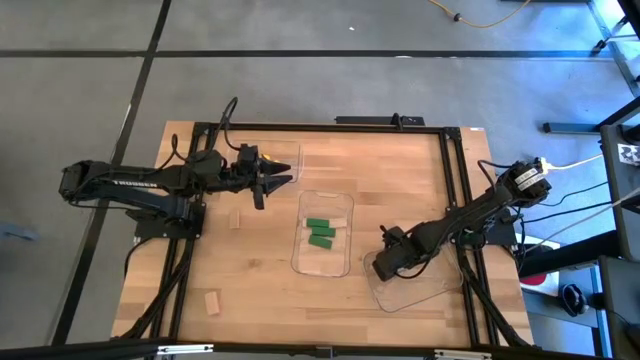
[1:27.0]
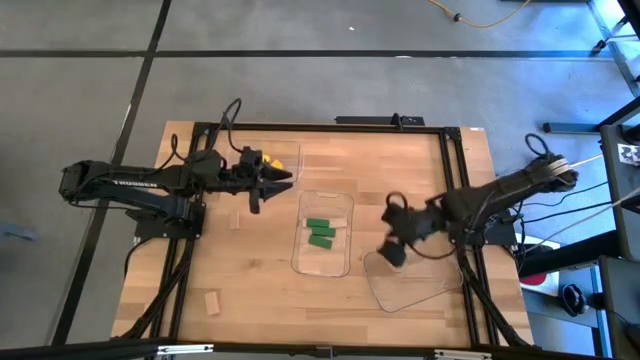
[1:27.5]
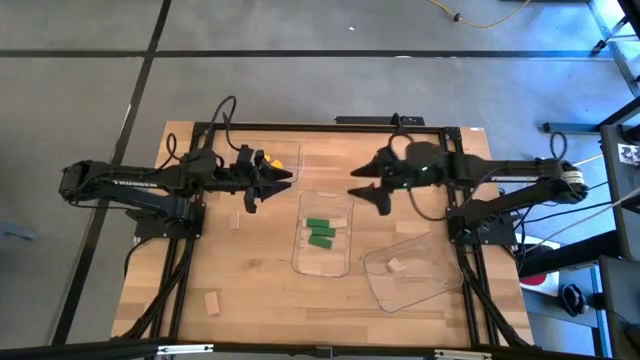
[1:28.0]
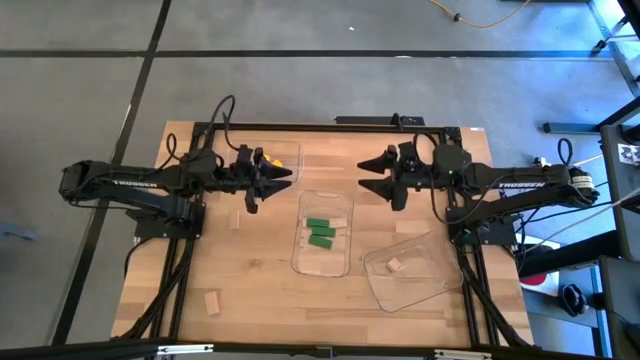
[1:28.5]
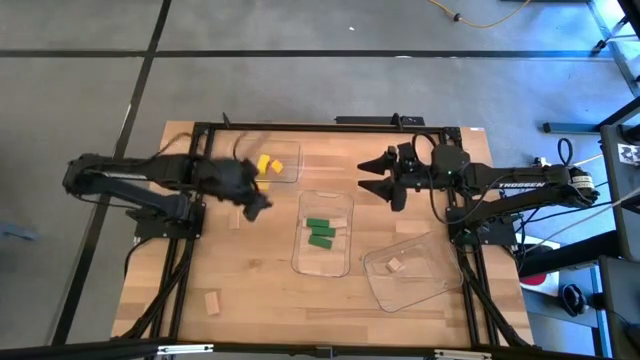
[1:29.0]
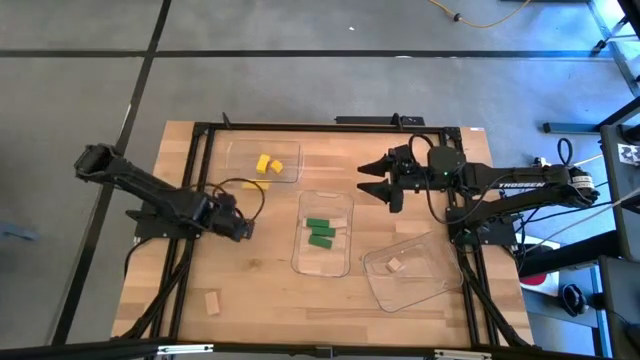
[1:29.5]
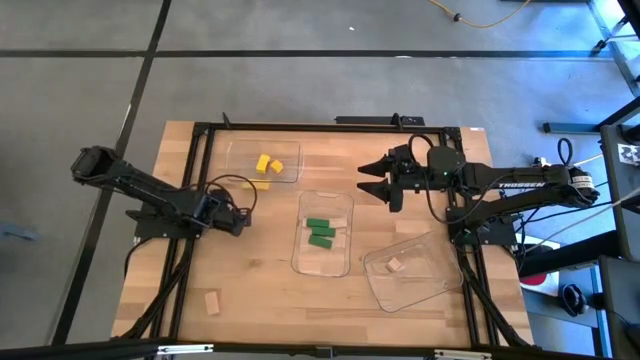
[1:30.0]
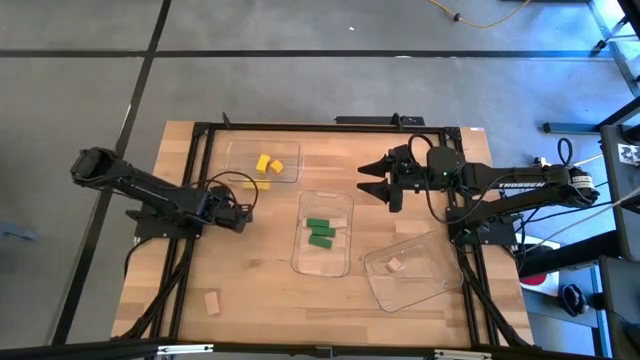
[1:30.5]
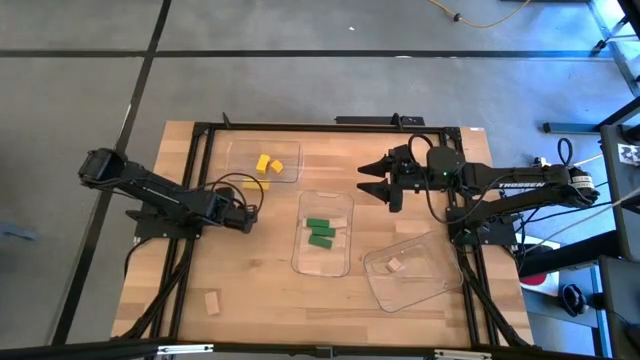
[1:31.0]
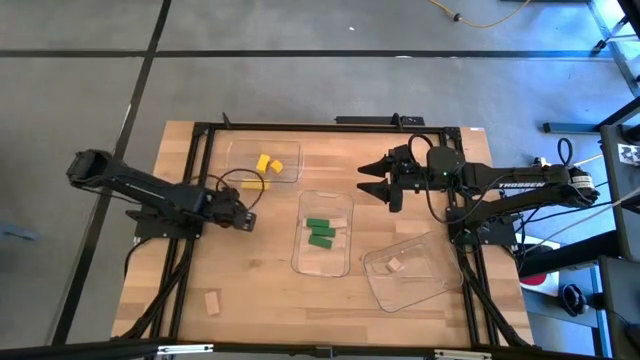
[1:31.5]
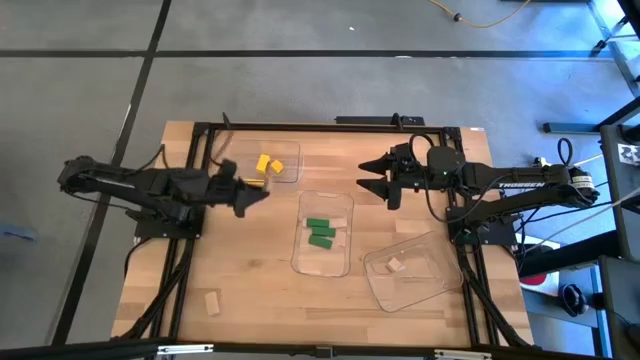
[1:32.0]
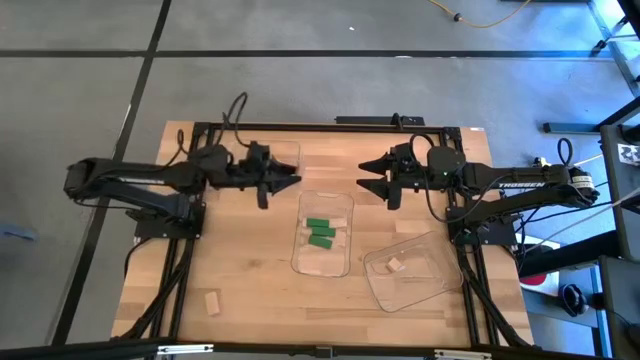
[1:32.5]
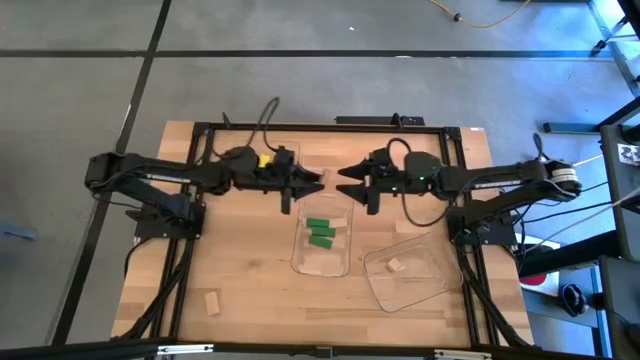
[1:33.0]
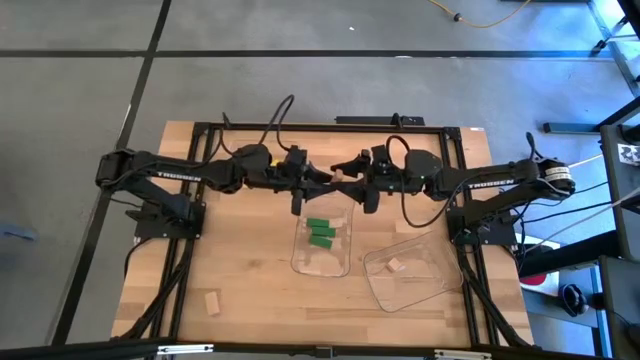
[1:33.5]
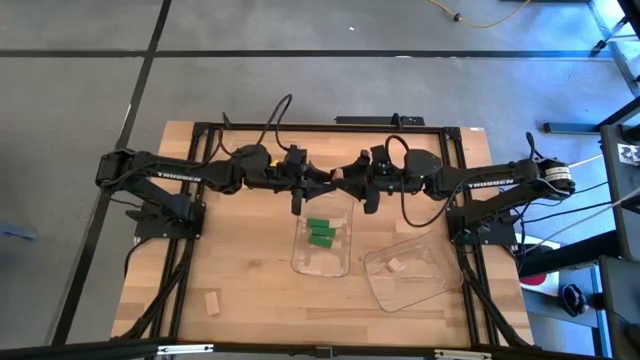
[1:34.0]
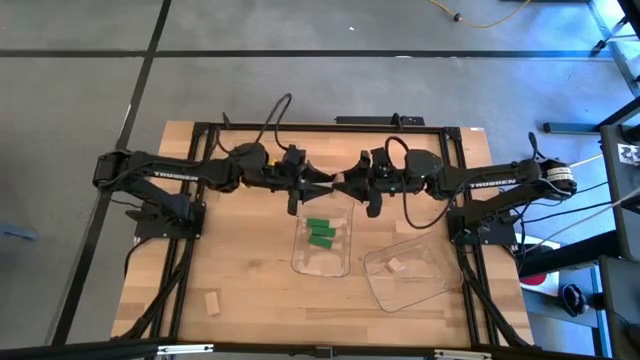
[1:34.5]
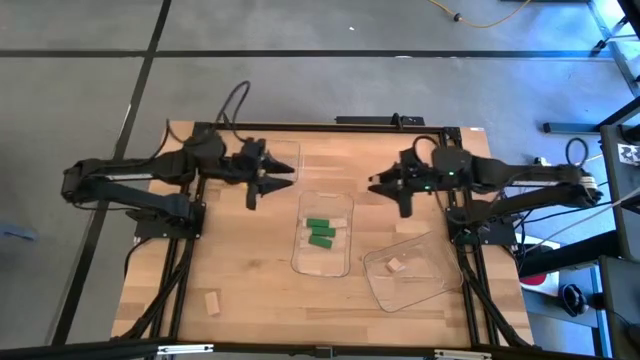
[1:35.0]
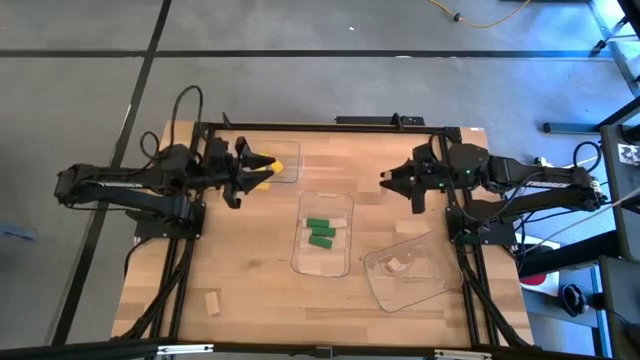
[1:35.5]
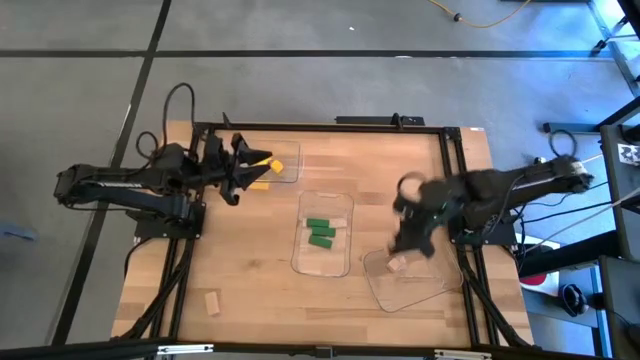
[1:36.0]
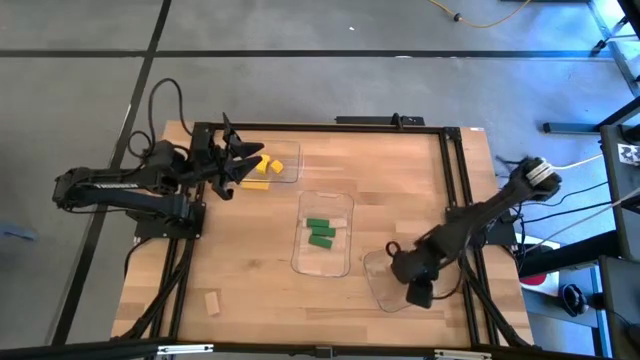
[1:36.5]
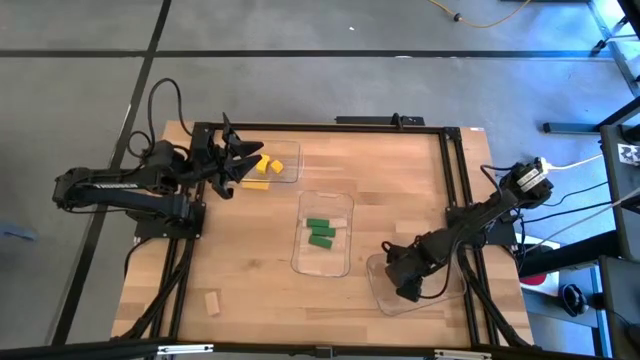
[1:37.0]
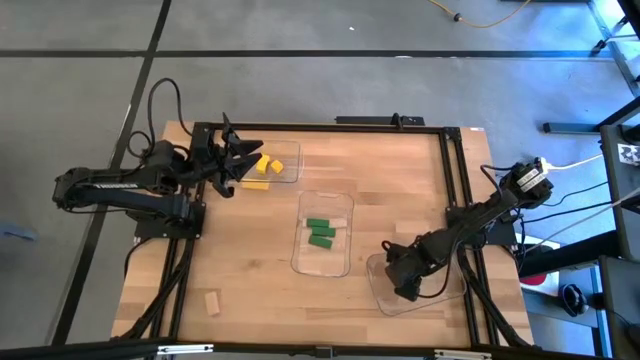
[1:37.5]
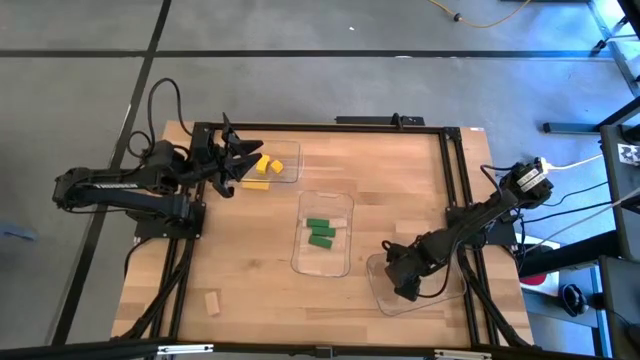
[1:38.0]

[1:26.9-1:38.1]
Task: Sort & place blocks by color
Put the top light brown block into the bottom transparent bin

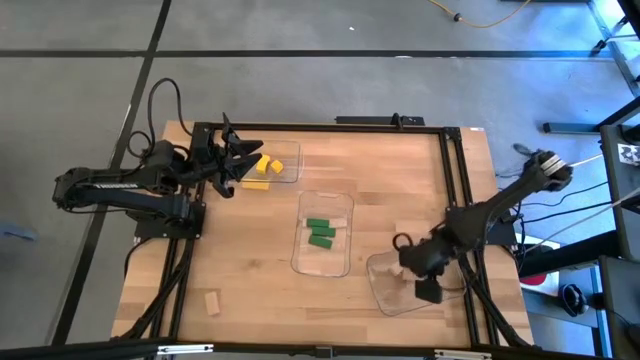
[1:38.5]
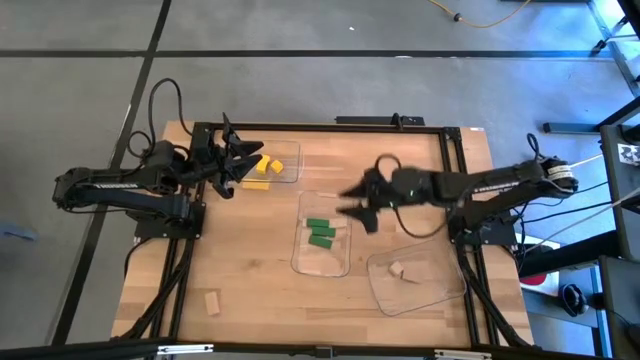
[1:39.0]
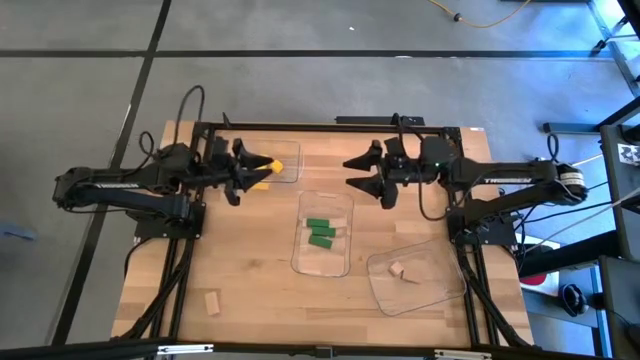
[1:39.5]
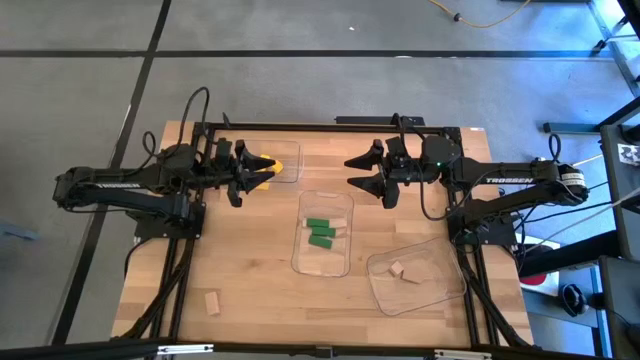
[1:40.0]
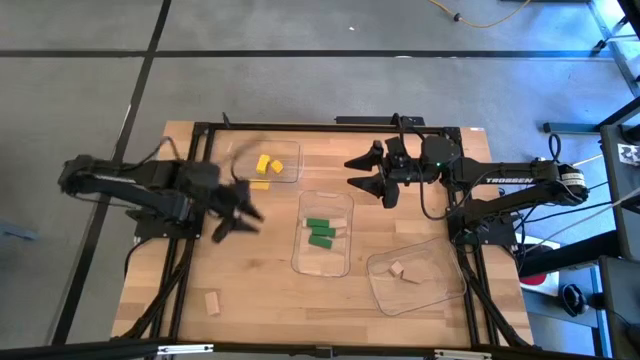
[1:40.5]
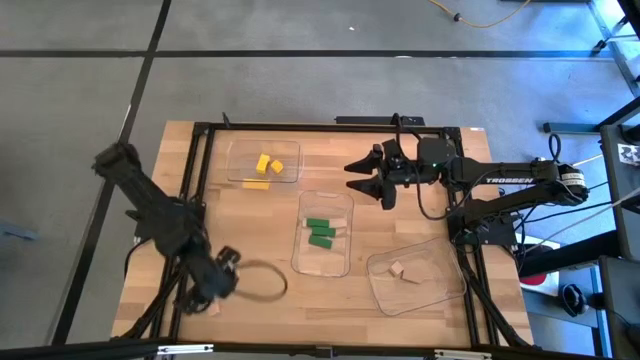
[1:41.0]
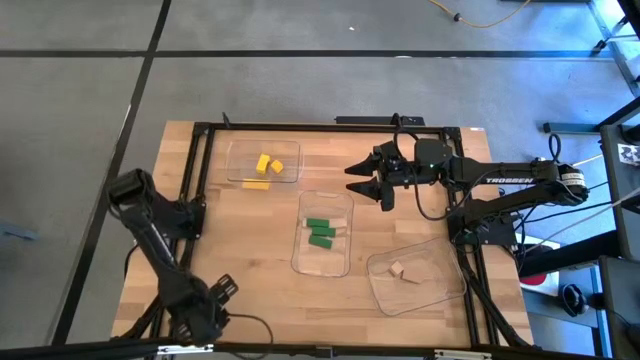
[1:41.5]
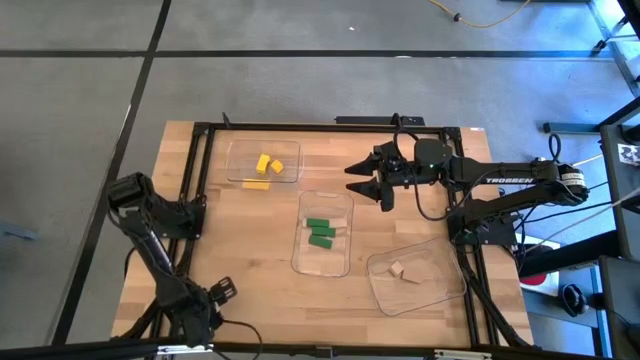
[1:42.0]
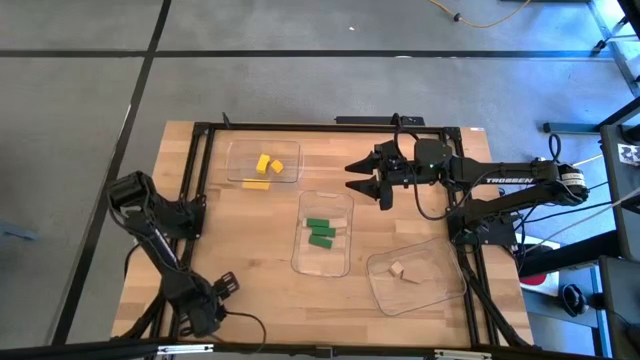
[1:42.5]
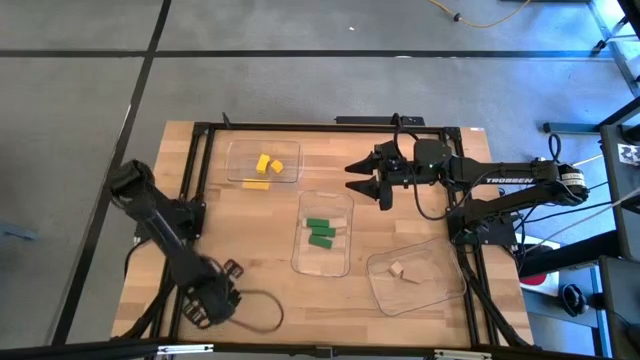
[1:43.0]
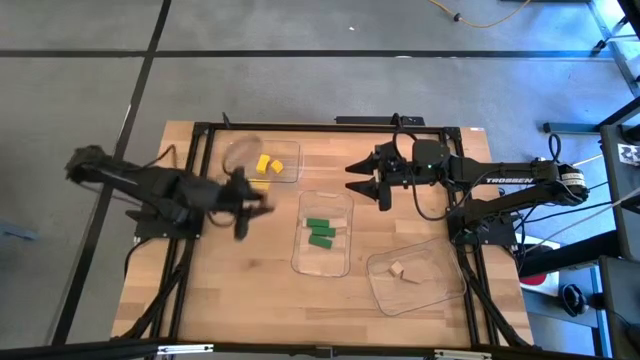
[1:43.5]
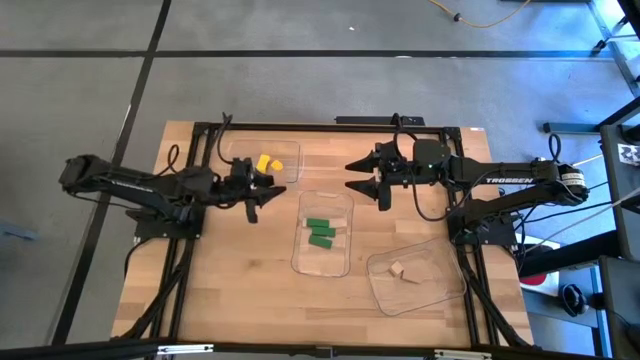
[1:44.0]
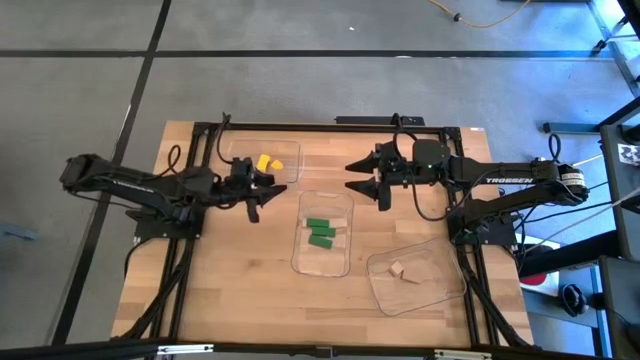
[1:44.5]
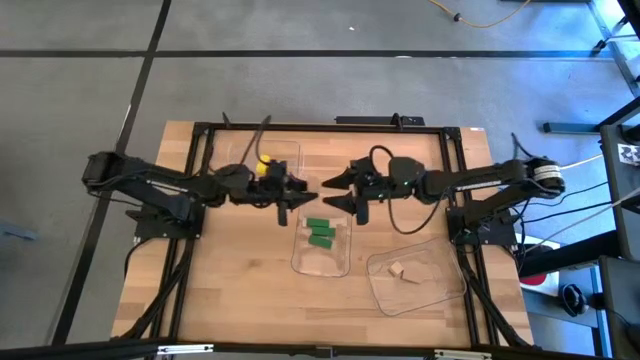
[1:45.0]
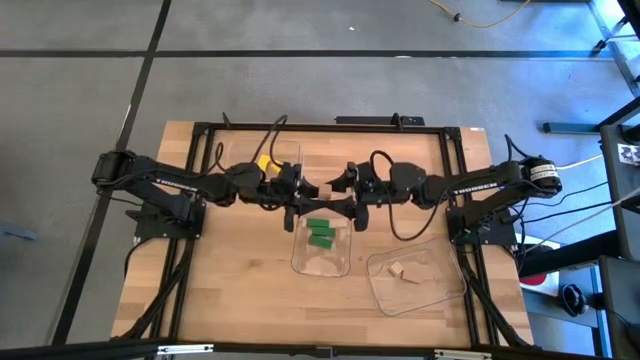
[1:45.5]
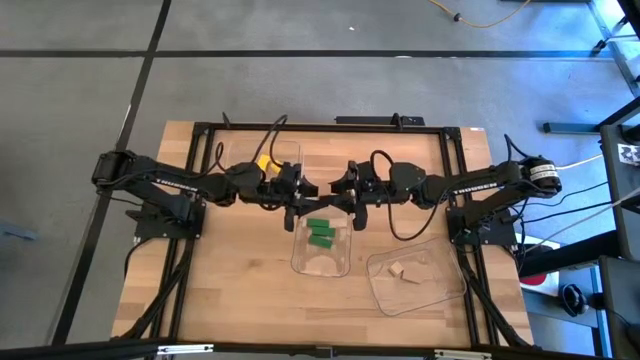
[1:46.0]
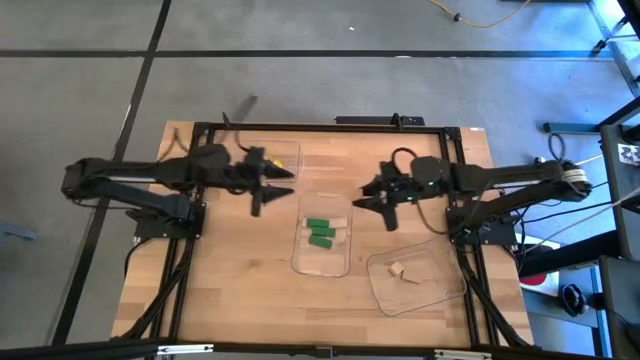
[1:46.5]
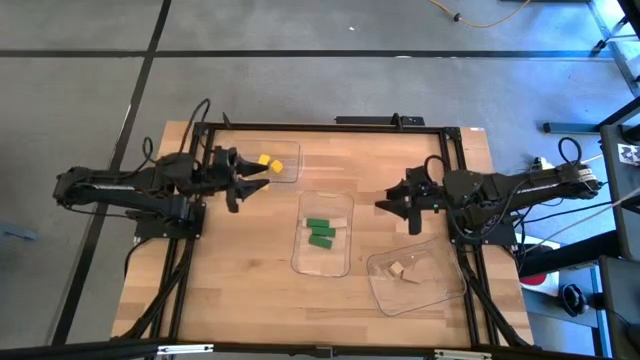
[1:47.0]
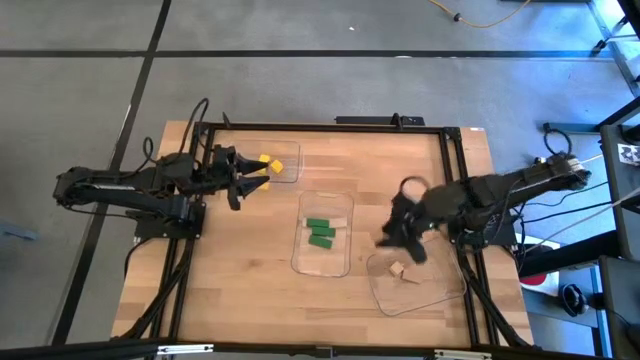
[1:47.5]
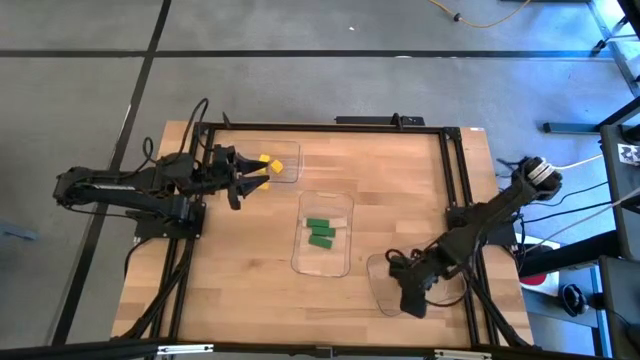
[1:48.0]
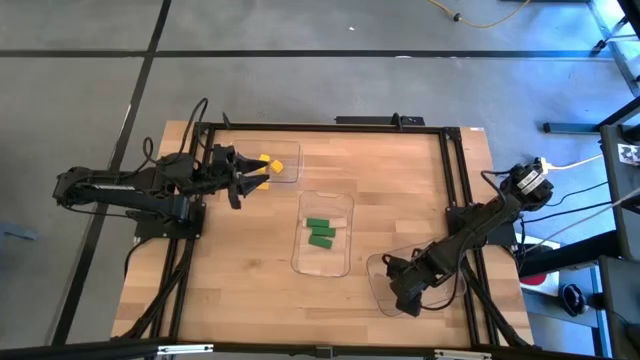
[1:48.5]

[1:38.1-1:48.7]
Put the light brown block into the bottom transparent bin
